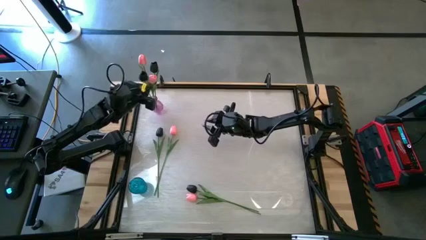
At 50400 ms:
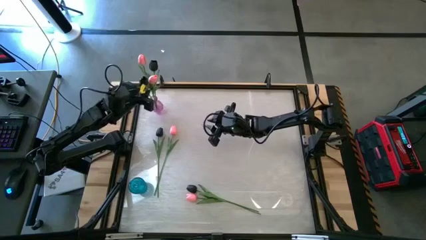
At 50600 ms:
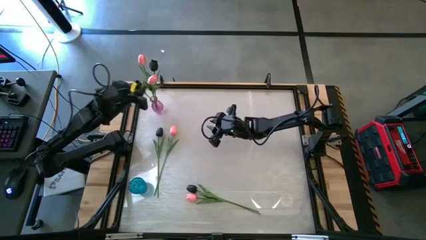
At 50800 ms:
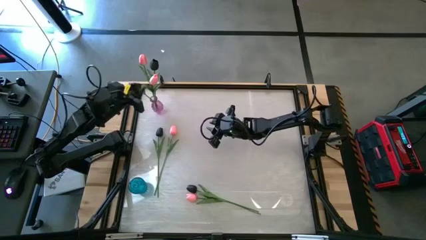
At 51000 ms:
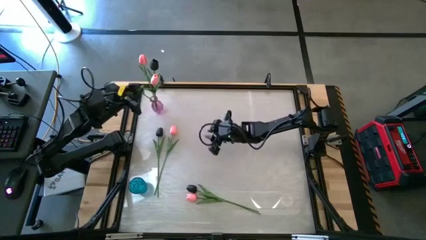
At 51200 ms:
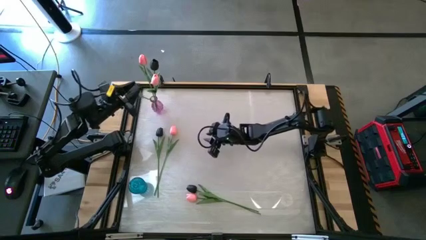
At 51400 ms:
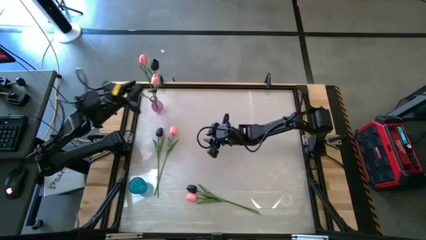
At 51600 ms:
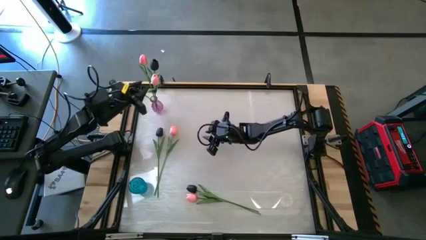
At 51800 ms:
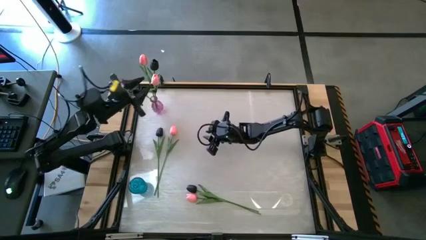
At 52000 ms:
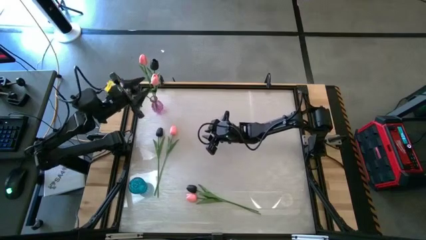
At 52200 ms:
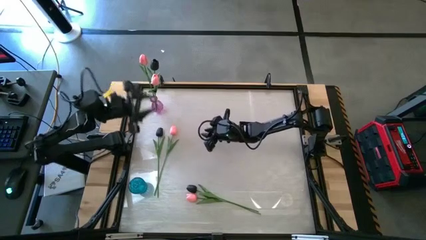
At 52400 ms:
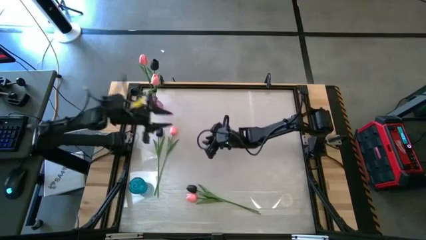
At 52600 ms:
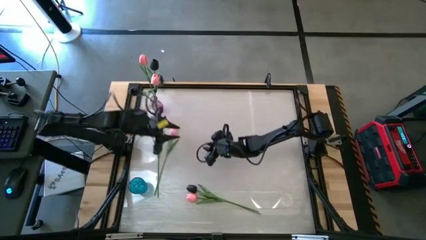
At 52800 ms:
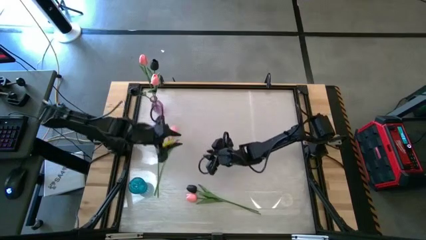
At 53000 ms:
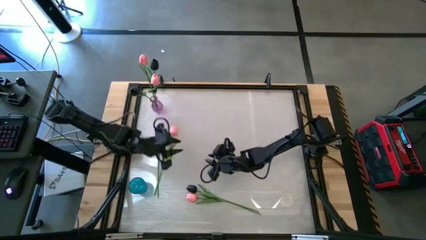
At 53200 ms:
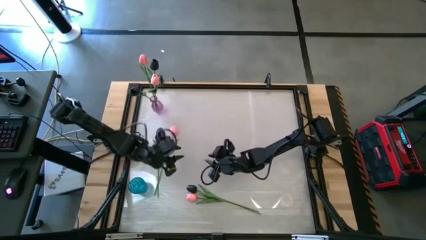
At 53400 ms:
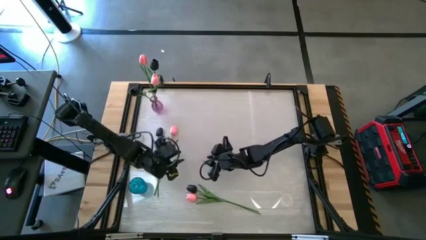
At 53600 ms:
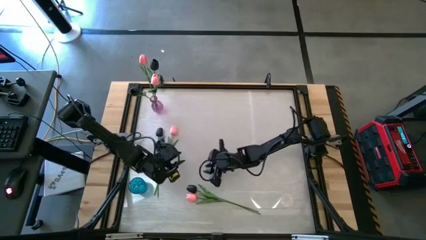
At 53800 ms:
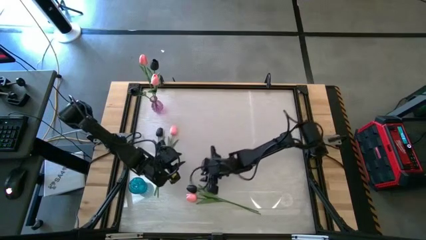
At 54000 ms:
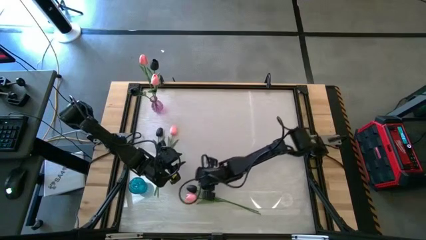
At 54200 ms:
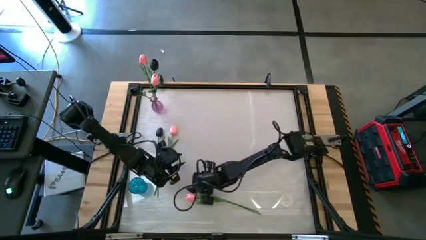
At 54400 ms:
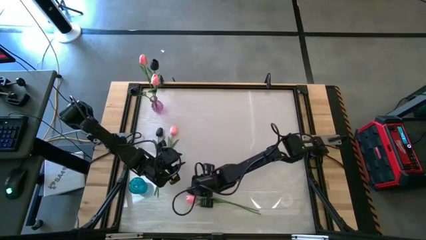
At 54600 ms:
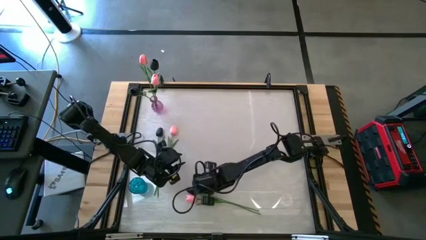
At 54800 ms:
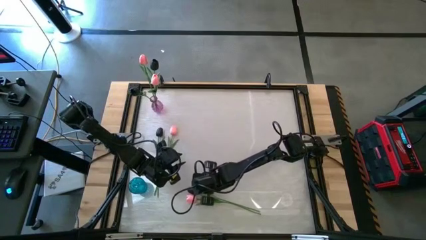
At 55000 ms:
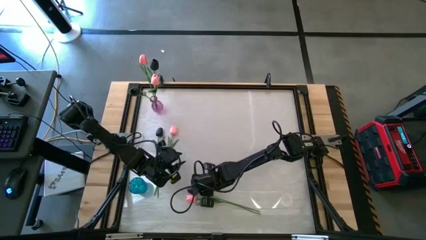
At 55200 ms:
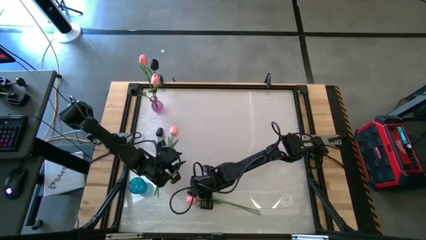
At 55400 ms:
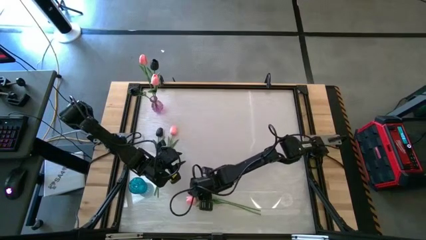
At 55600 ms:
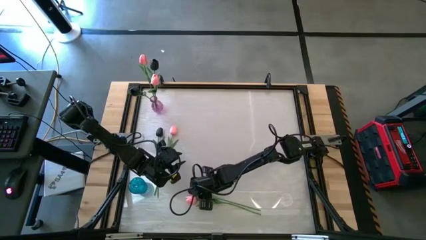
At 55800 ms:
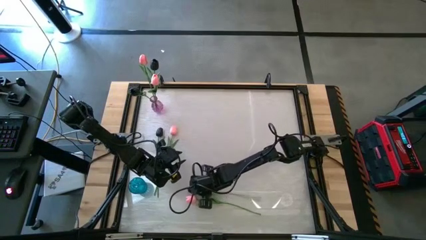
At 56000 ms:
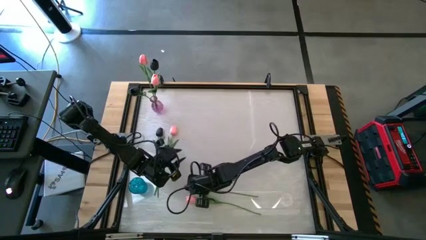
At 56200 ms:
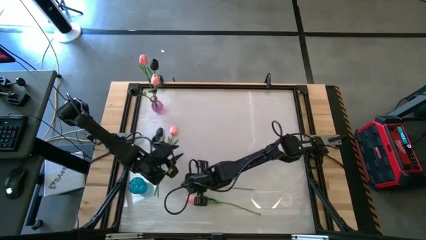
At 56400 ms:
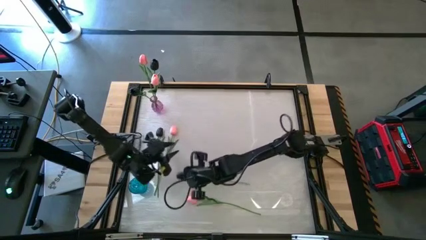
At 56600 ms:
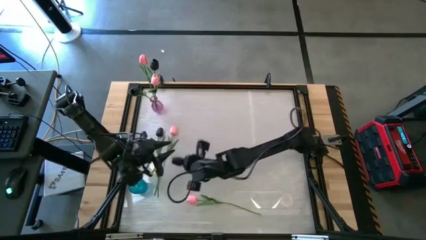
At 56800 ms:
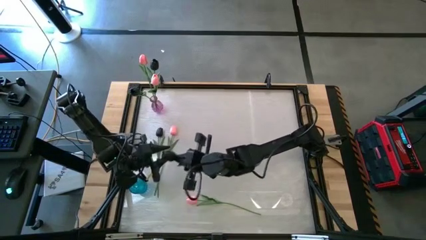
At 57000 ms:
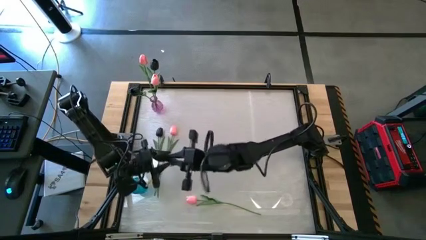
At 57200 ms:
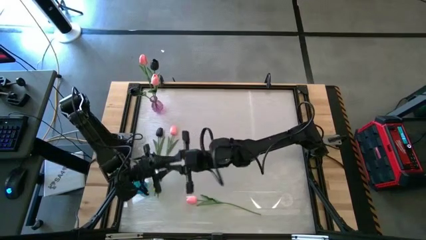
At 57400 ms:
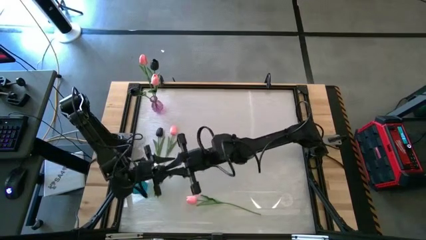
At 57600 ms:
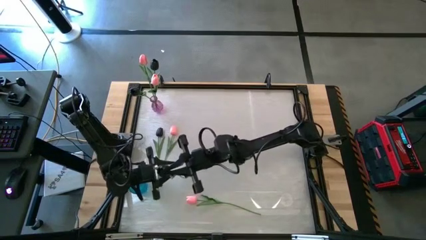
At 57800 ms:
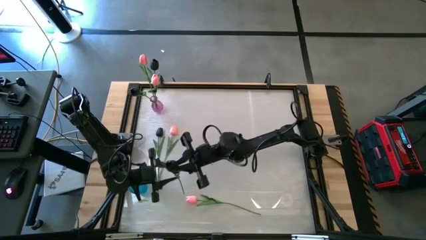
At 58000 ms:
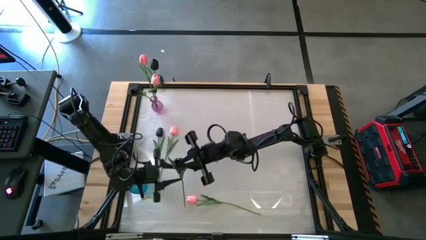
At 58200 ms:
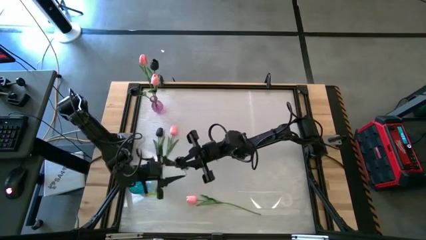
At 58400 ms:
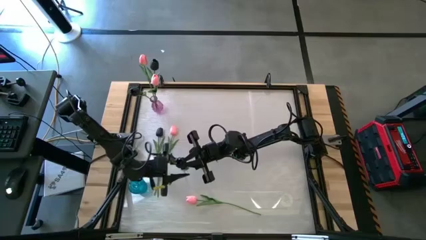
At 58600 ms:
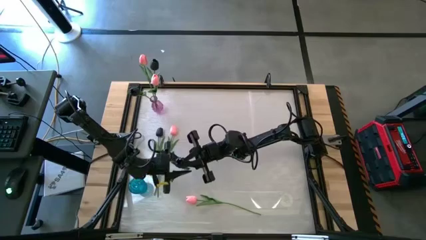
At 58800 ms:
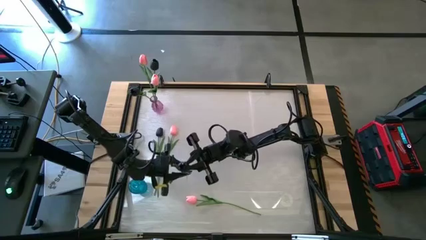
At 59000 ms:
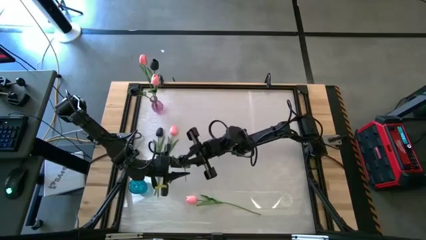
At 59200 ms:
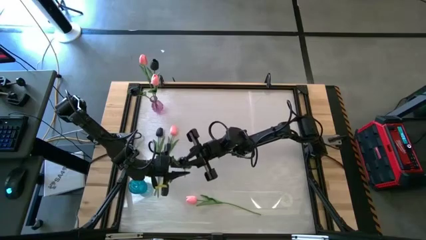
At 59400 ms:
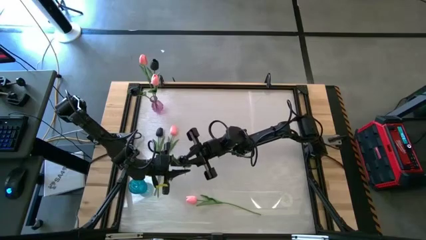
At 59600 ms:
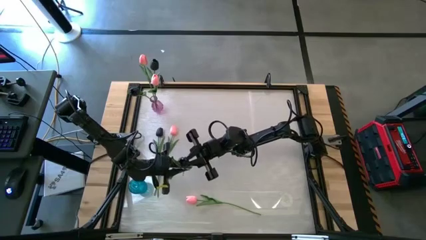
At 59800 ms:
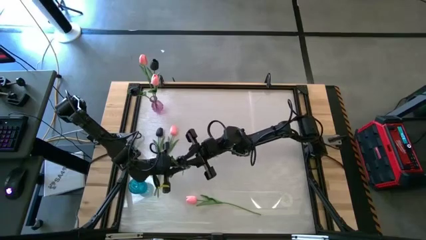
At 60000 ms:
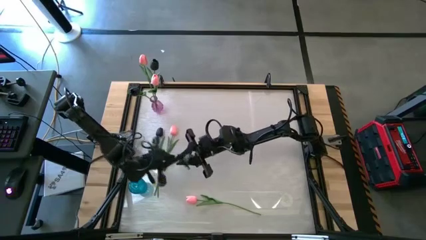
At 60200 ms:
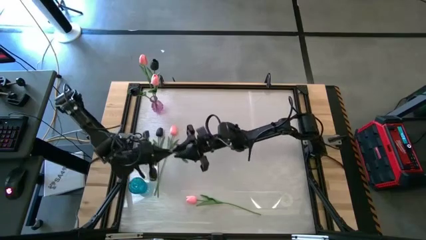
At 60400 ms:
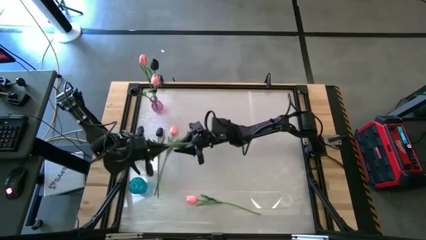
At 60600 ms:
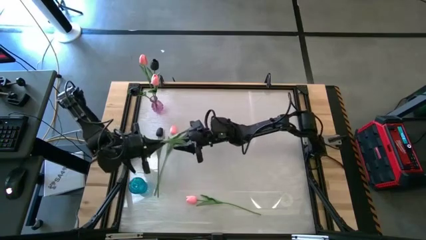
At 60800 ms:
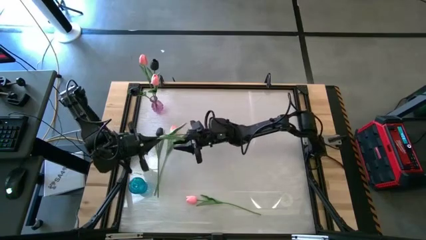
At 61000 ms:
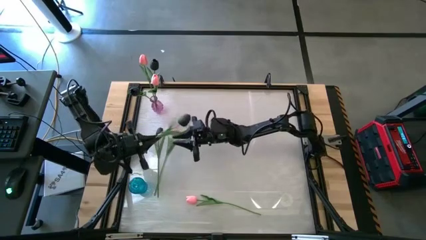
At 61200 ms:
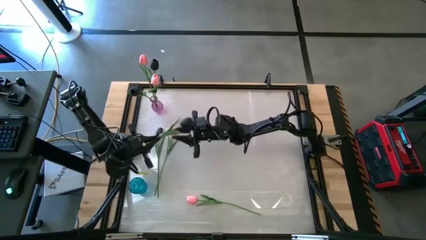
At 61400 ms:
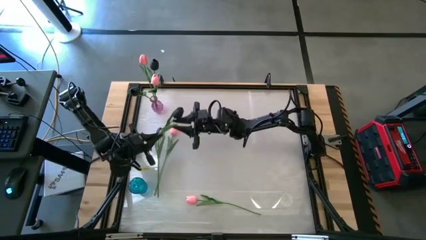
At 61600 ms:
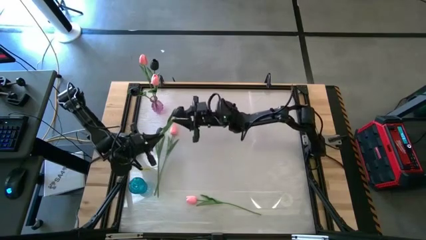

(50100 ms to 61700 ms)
Task: Sort flowers into vase by color
Put the black flower into the blue glass vase
